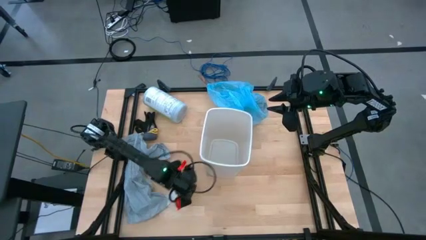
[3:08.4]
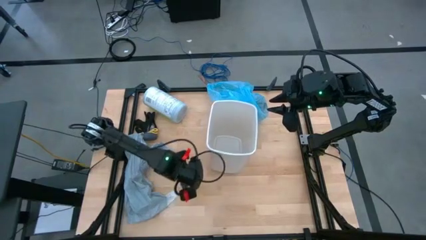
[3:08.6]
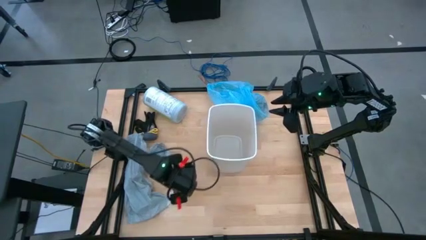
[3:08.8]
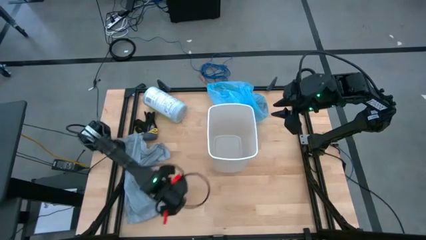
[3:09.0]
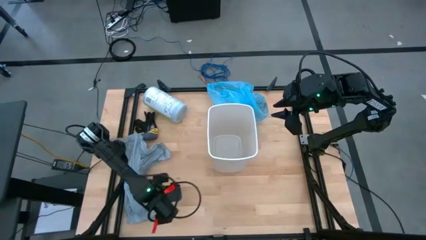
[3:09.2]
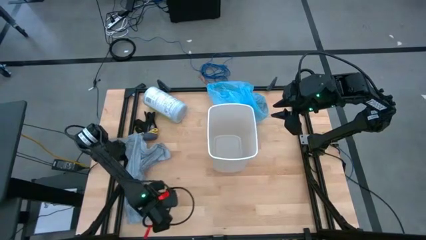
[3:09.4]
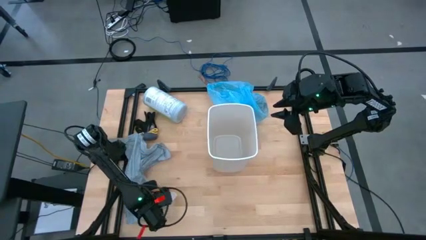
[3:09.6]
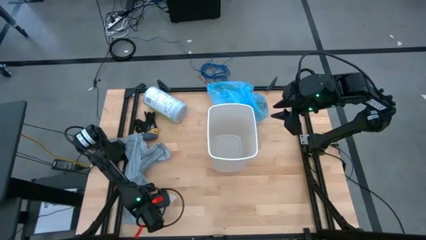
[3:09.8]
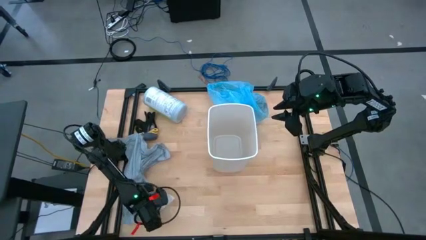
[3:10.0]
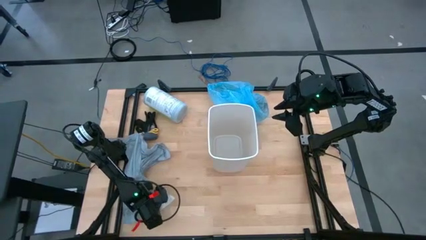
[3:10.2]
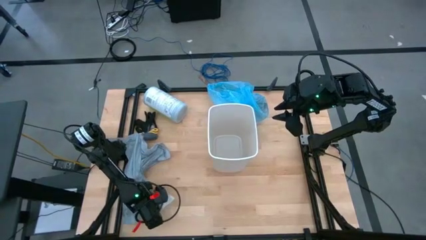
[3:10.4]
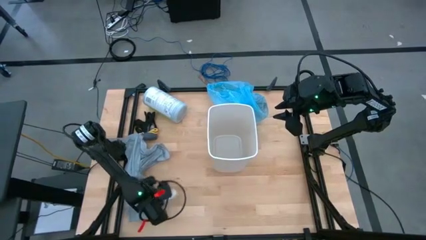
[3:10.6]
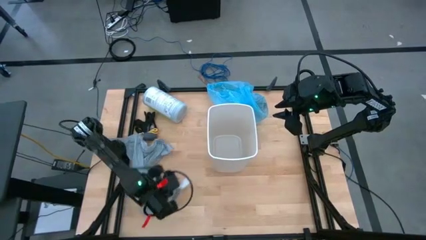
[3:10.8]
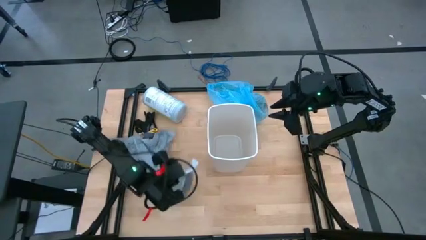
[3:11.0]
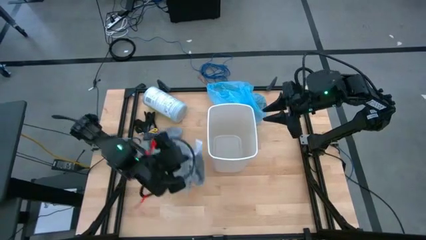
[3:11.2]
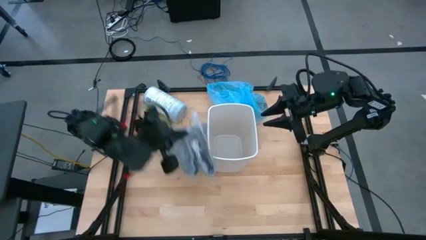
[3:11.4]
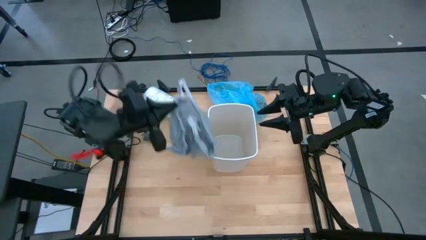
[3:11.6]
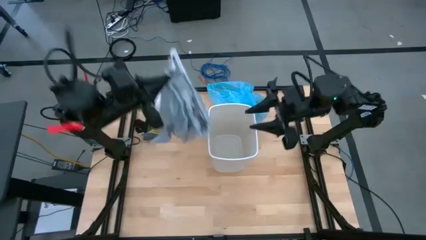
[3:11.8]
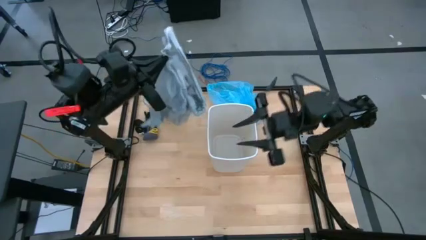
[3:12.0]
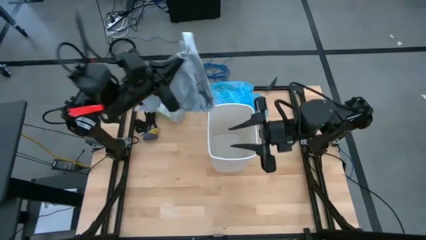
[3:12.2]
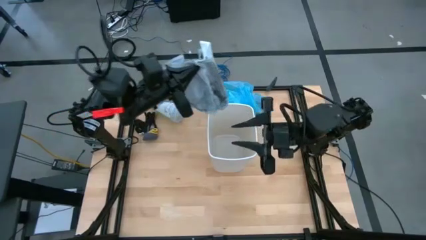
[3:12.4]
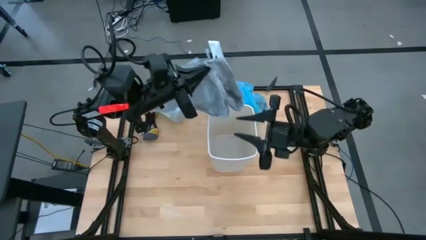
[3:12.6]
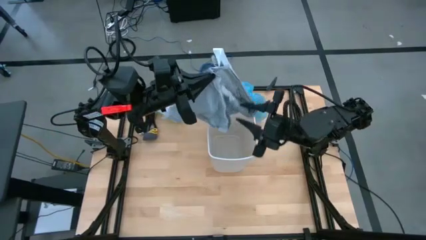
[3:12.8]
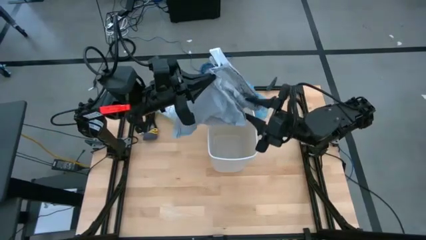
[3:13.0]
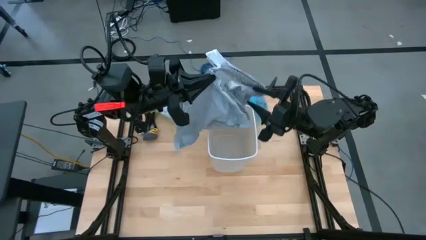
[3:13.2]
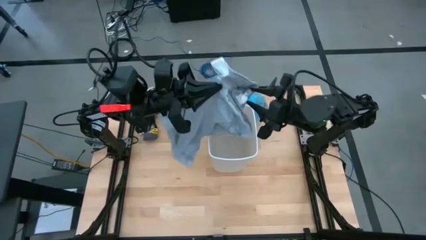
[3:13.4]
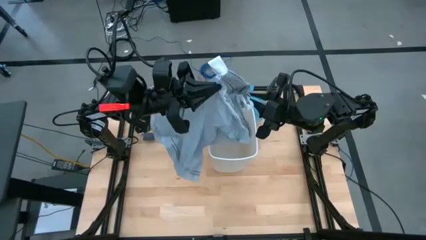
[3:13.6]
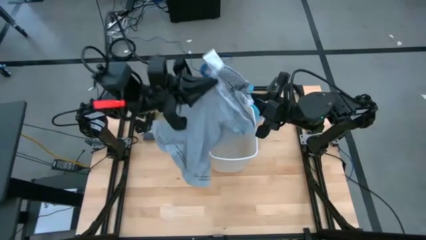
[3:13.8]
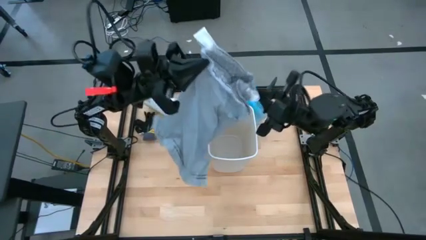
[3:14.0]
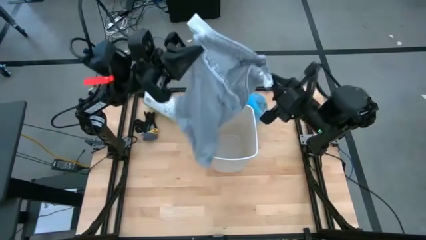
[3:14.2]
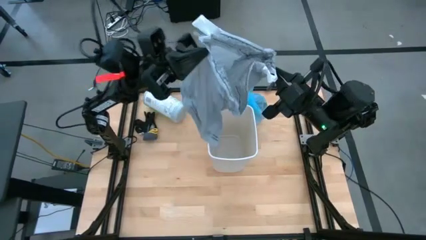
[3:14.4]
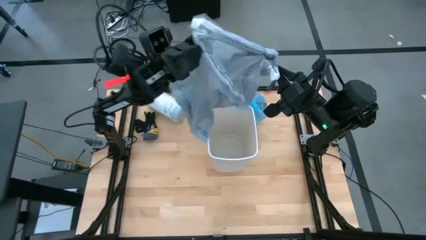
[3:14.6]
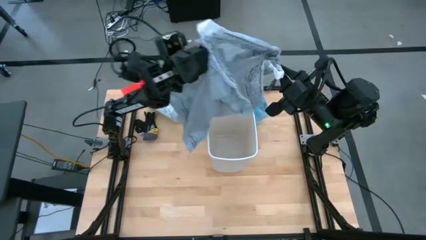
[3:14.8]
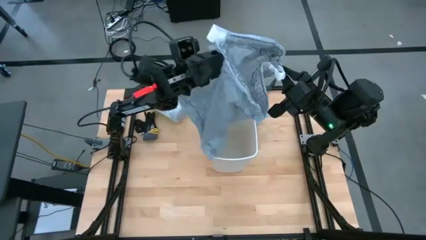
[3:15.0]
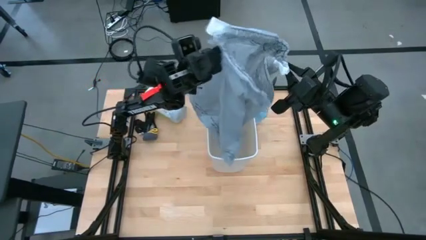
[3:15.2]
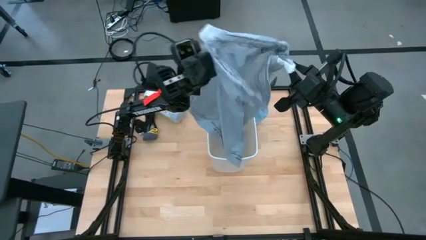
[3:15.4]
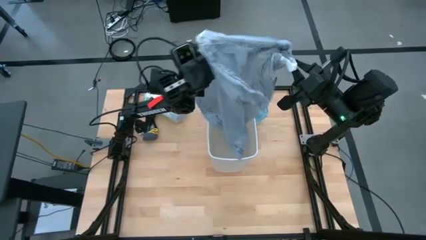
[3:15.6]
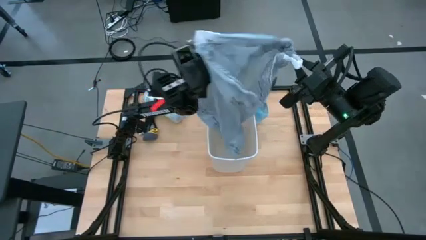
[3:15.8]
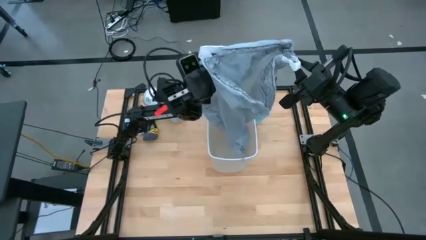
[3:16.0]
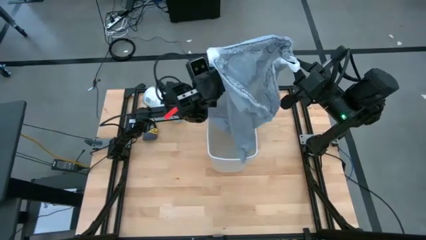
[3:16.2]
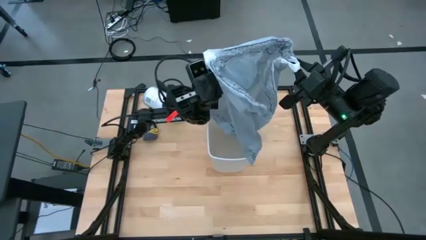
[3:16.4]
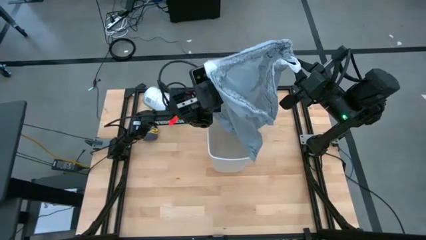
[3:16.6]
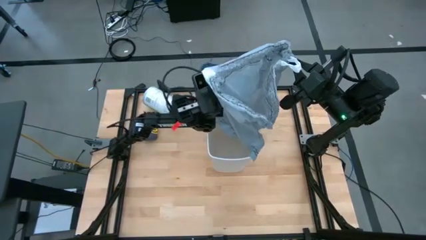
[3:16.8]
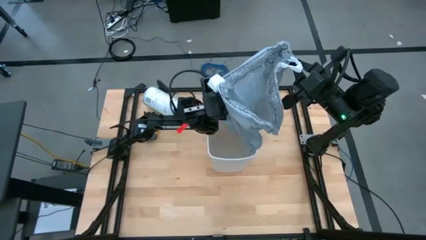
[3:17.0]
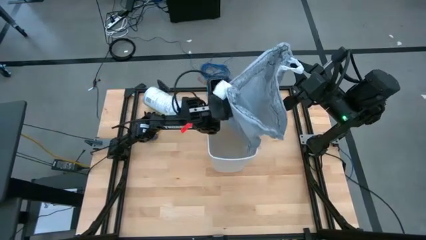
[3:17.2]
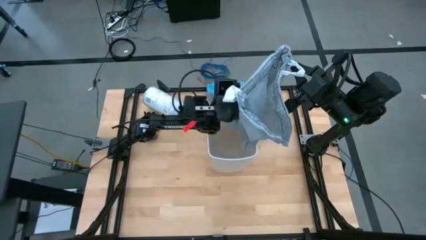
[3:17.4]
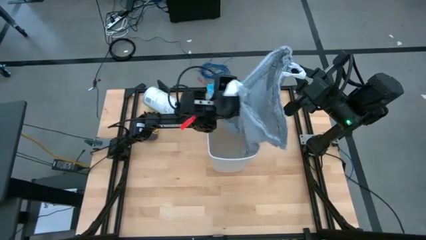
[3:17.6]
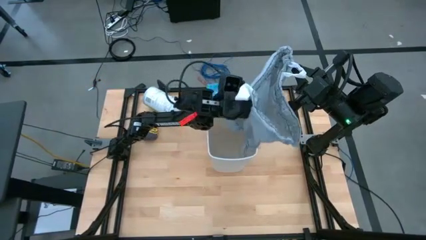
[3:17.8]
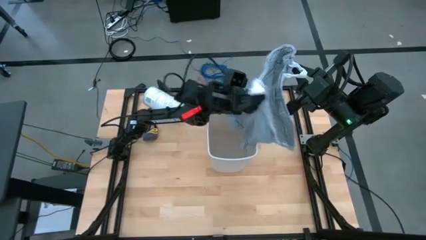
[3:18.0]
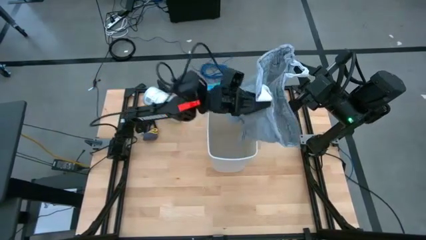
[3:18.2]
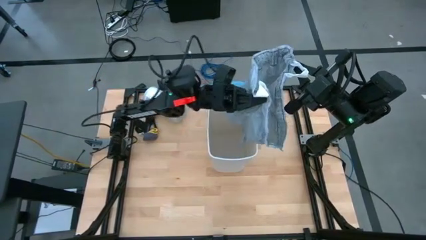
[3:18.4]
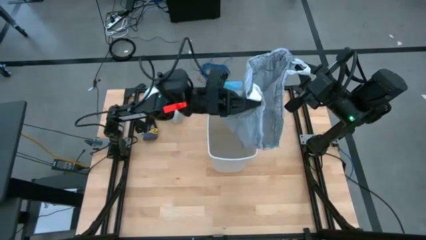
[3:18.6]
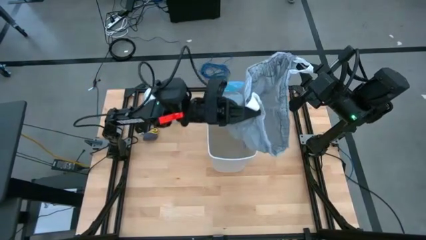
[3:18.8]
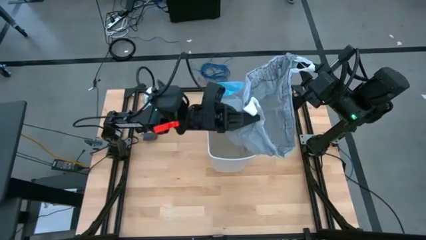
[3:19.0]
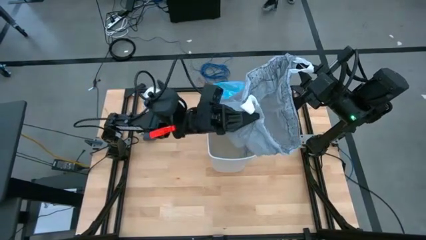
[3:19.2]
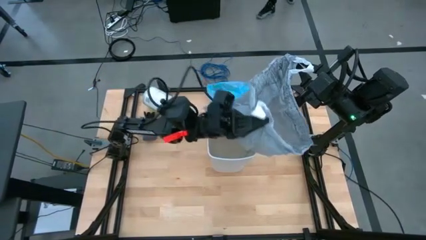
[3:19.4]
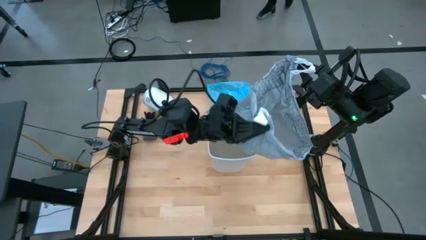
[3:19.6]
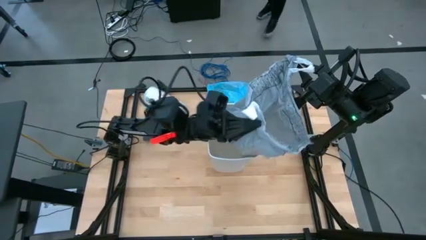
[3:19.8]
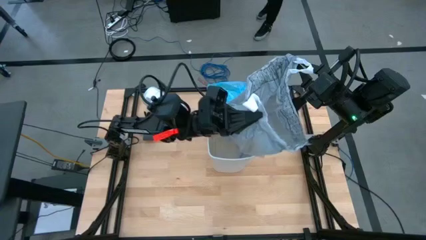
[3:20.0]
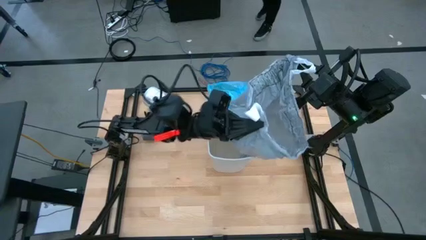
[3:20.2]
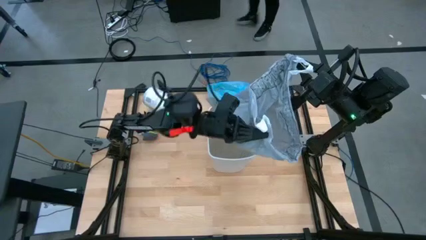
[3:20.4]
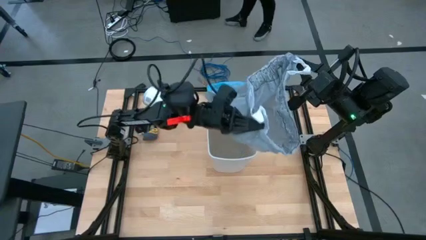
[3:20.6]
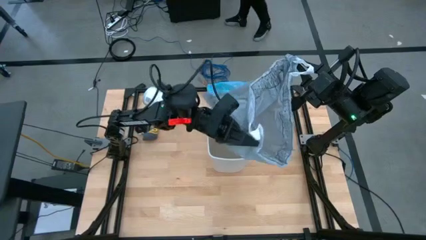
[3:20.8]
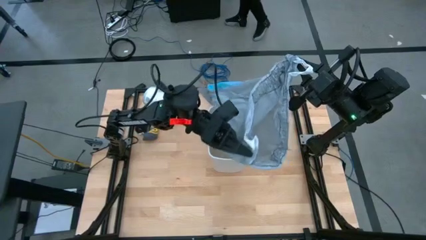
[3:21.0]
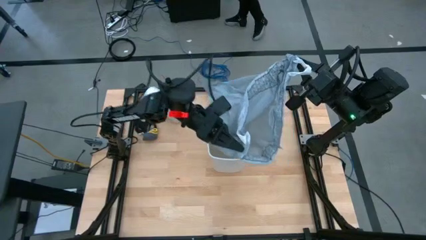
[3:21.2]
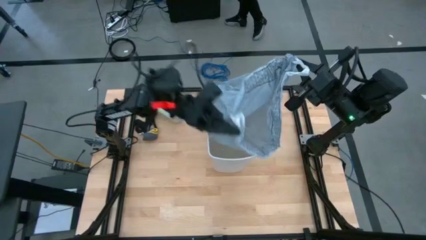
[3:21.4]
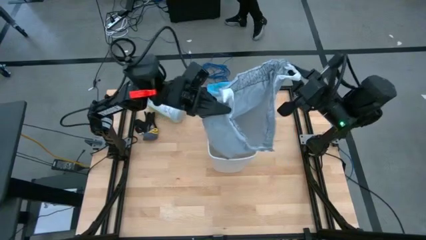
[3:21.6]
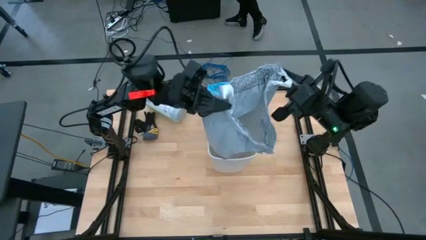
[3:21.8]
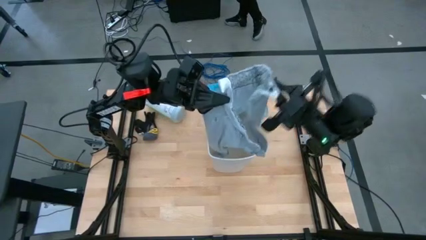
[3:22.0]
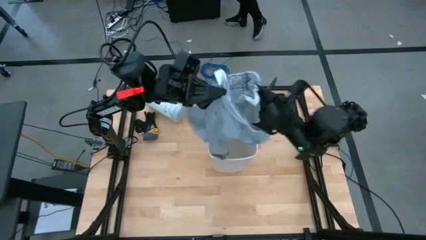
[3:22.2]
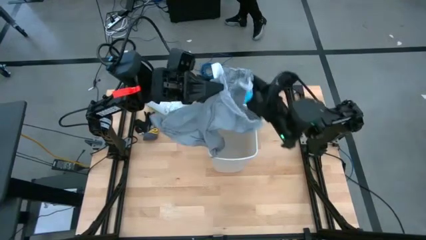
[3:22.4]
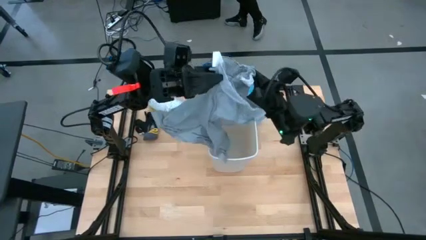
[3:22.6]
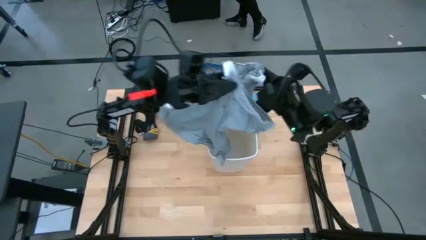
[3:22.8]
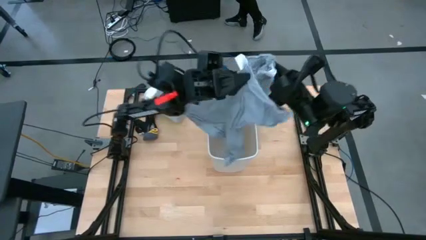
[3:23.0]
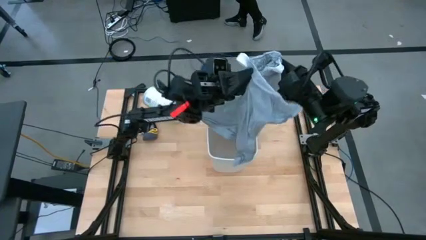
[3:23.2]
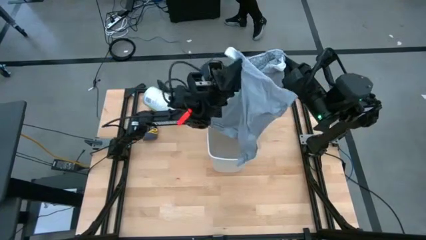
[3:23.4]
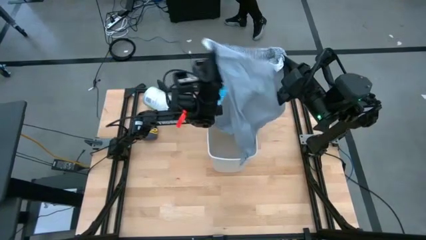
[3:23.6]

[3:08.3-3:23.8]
Task: place trash/remove bag and relplace
Put the gray trash bag into the trash bin

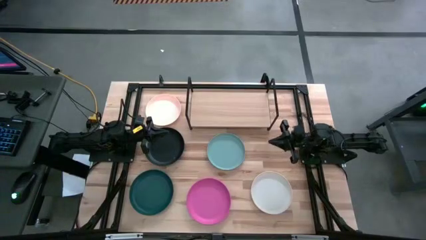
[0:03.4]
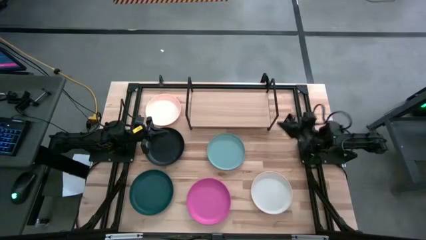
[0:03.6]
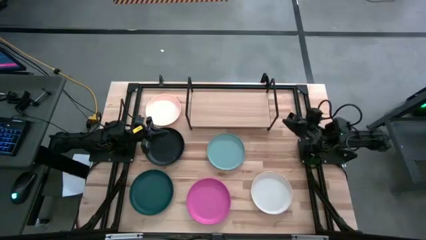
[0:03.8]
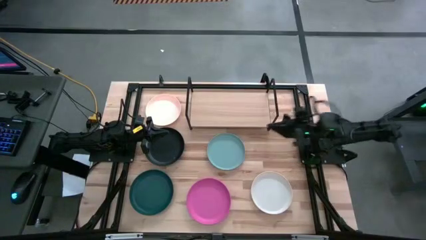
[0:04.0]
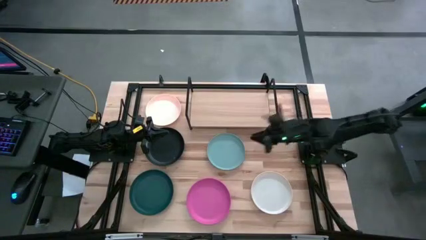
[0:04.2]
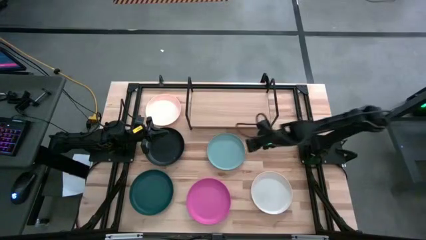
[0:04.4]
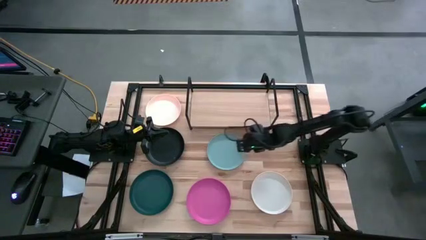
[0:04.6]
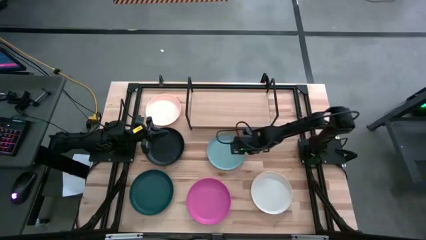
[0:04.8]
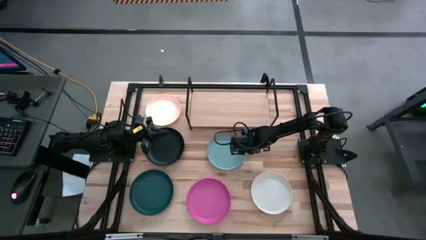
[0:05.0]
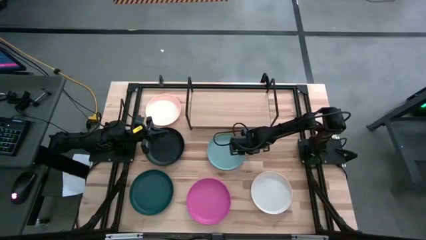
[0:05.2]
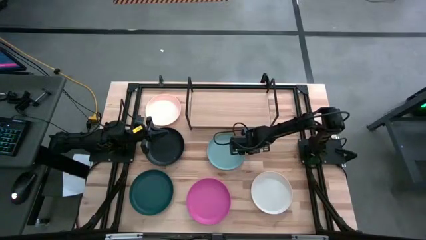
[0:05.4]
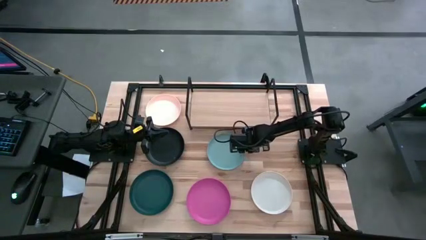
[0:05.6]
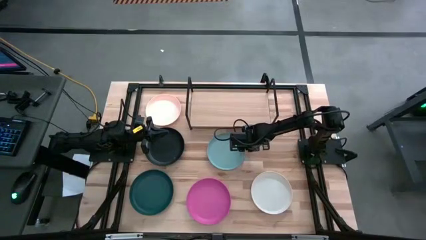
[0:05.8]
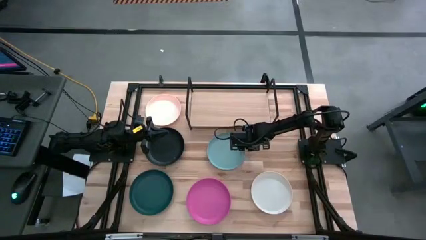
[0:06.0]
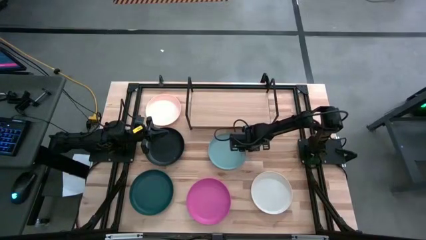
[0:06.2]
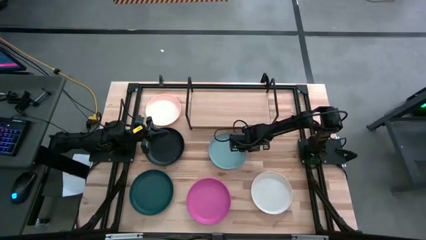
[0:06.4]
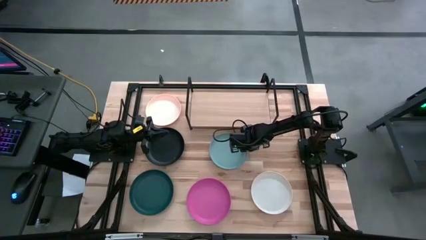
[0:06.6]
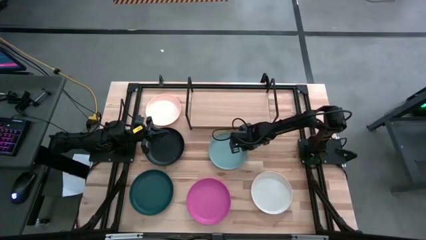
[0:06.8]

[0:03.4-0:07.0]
Task: Place and stack plates onto a shelf
Put the light blue plate on the shelf
